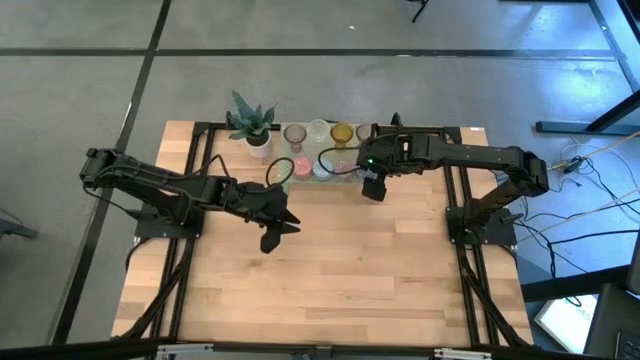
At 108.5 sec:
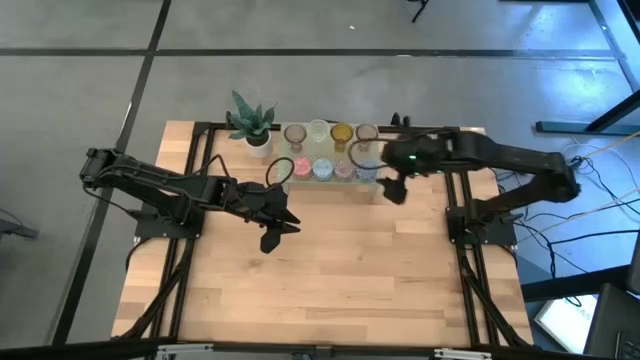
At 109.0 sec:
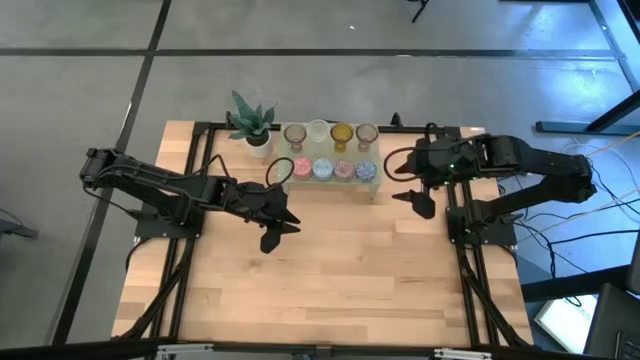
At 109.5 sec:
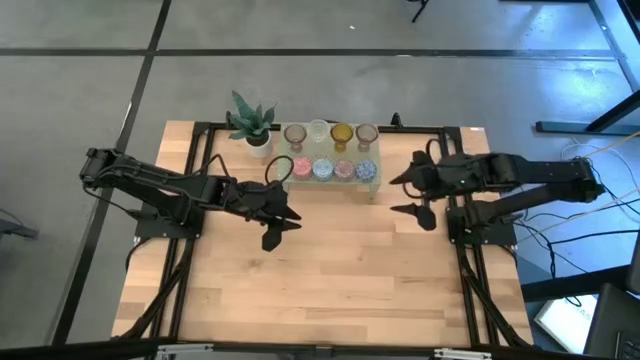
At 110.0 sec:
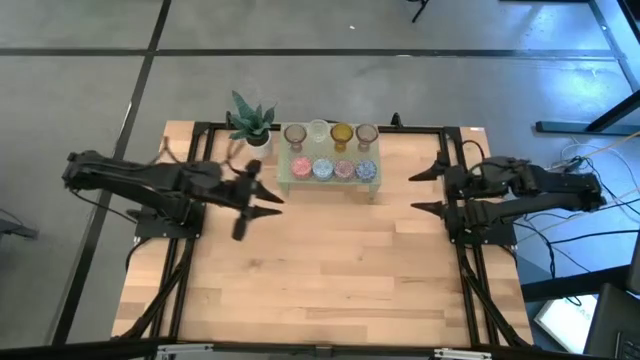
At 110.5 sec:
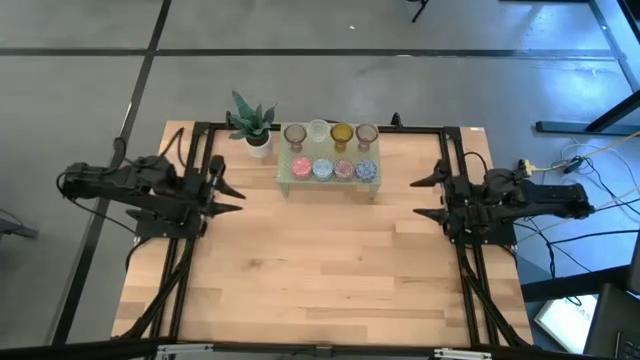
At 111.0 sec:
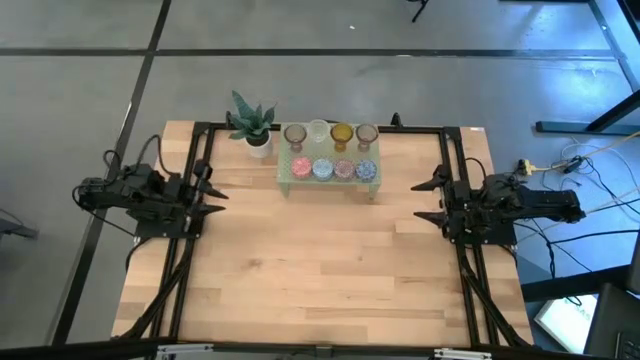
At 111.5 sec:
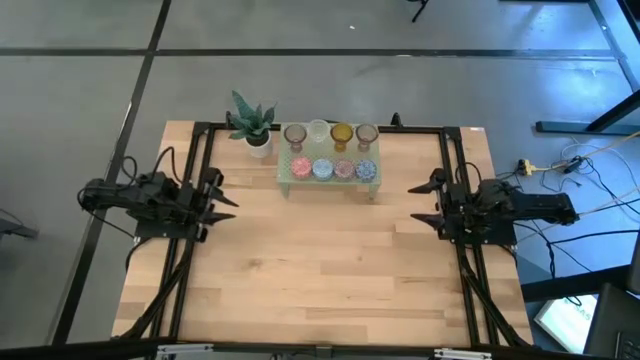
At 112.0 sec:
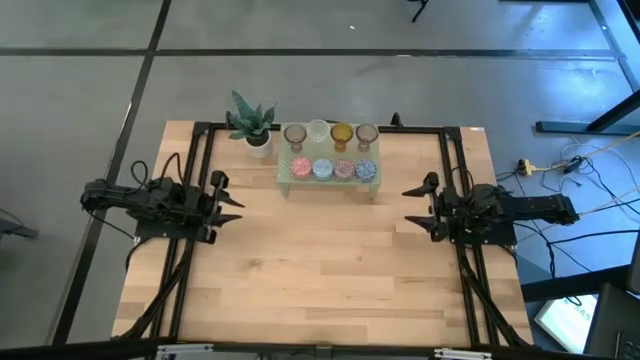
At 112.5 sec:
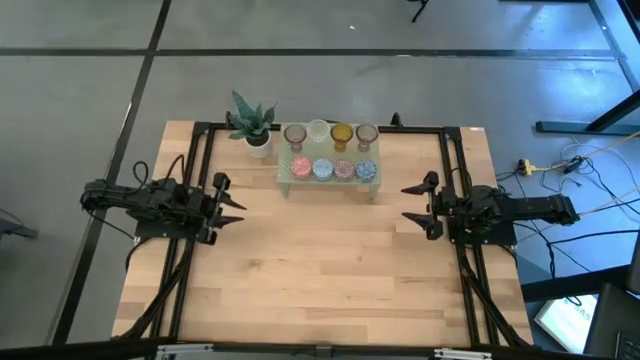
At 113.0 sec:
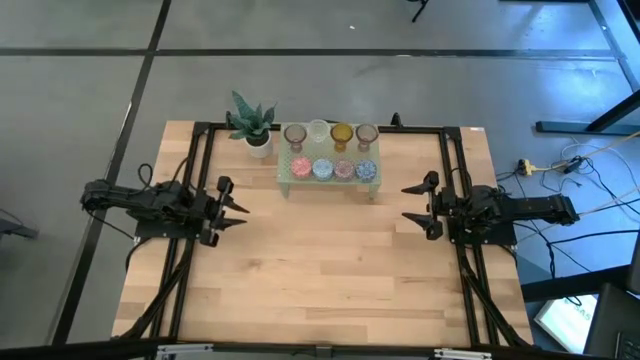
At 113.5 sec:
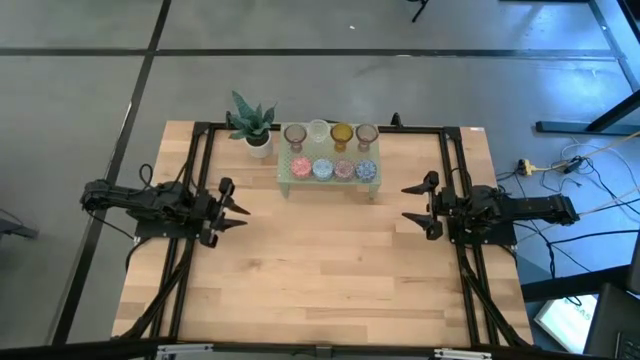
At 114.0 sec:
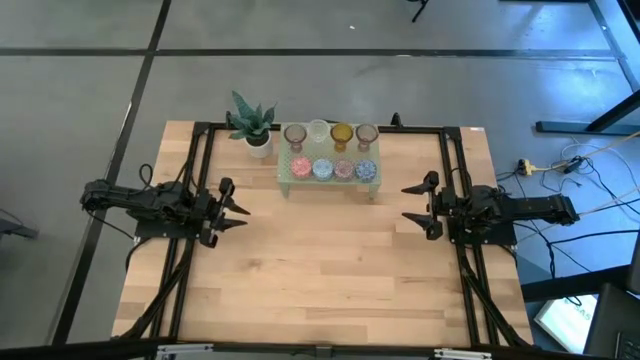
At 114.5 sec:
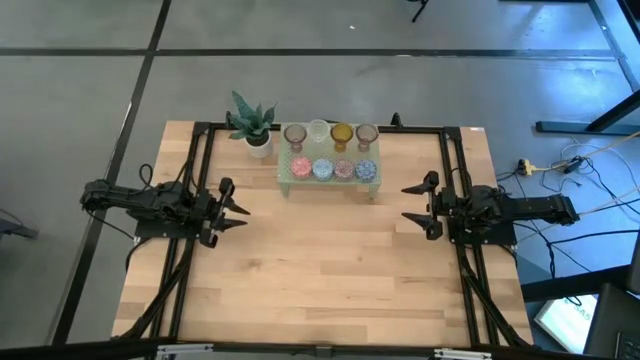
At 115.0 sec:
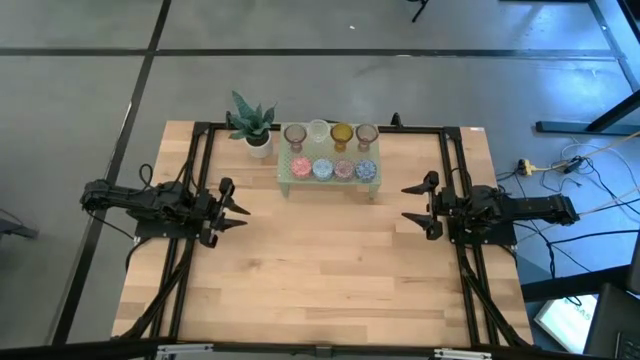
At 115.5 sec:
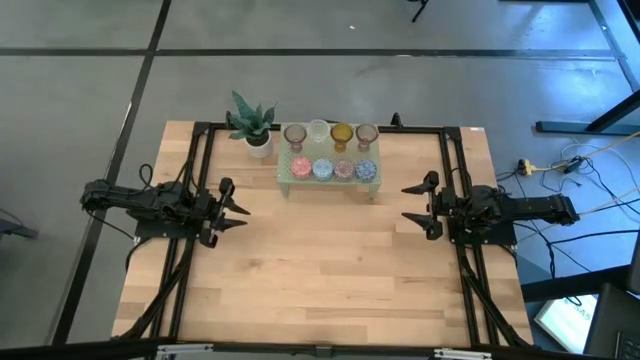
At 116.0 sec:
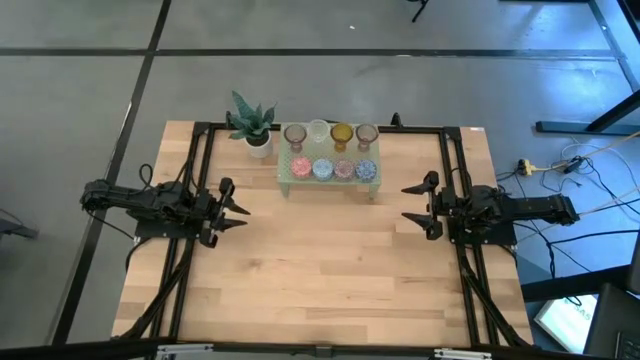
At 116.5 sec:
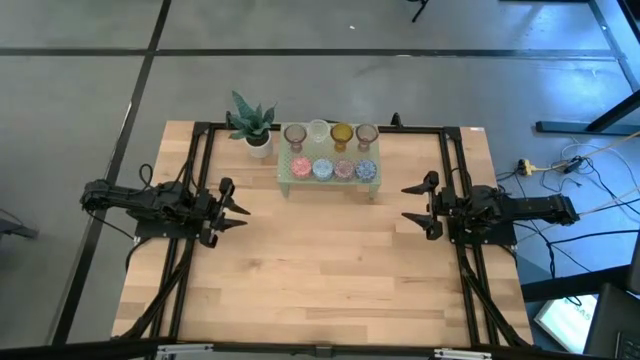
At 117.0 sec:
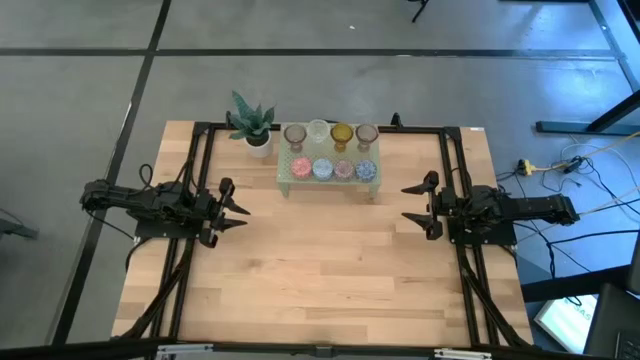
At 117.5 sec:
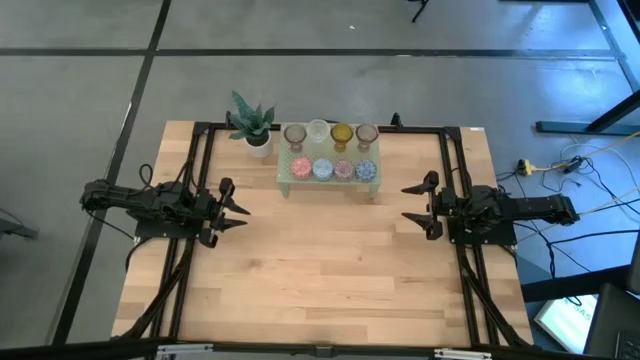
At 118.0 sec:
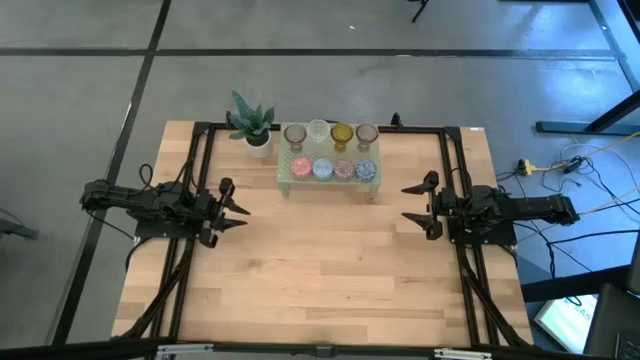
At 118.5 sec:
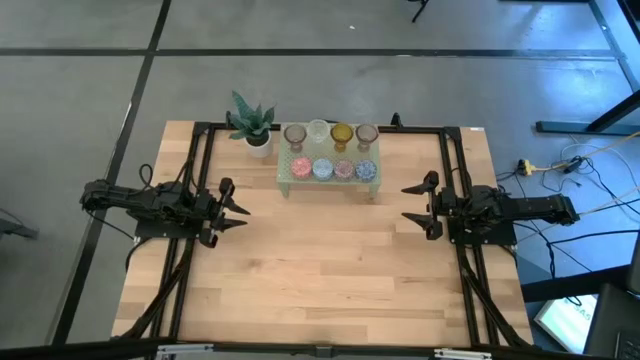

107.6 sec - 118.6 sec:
Task: Pick & Place candle stick holders
Return to Home Position

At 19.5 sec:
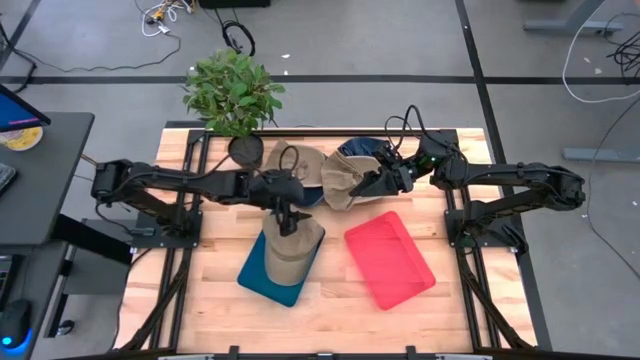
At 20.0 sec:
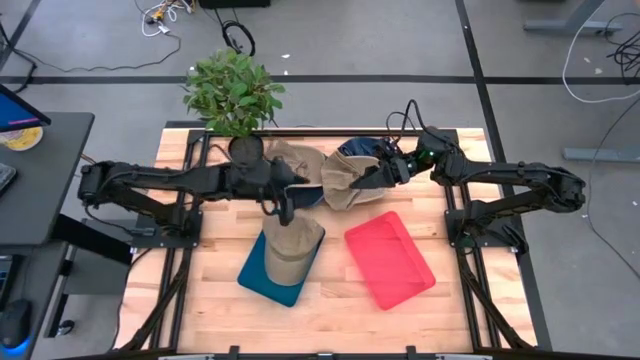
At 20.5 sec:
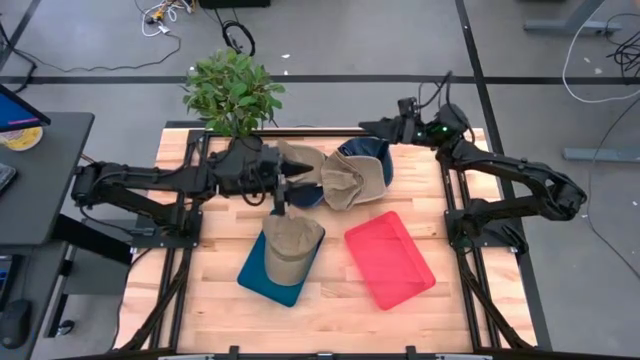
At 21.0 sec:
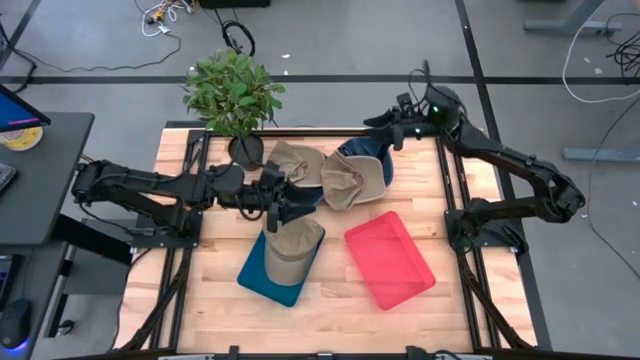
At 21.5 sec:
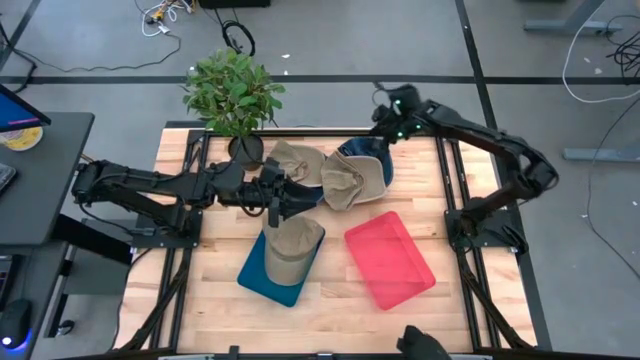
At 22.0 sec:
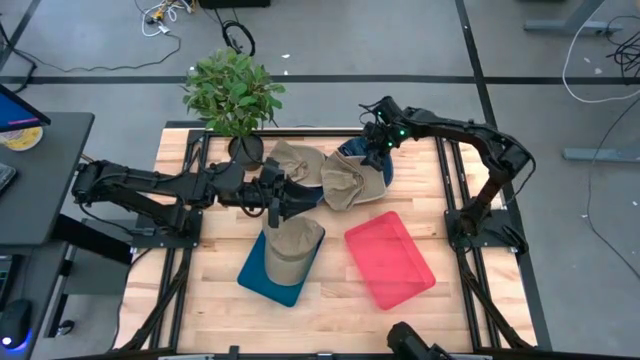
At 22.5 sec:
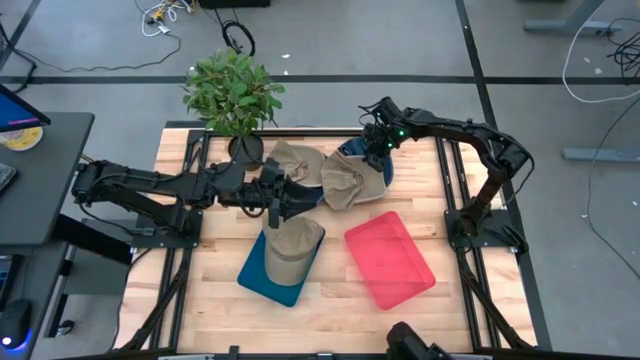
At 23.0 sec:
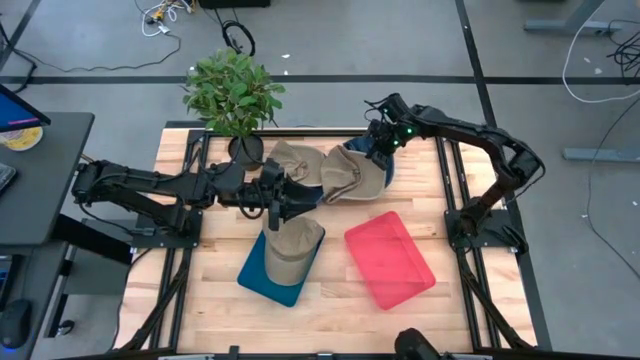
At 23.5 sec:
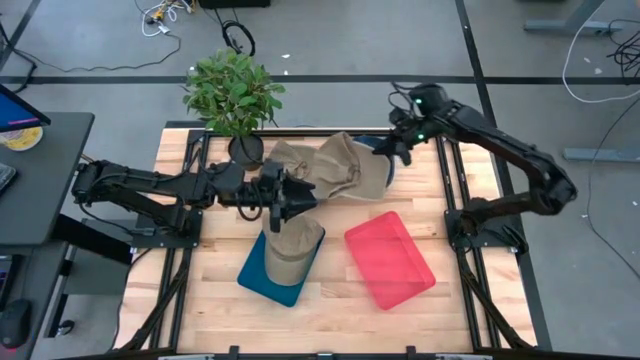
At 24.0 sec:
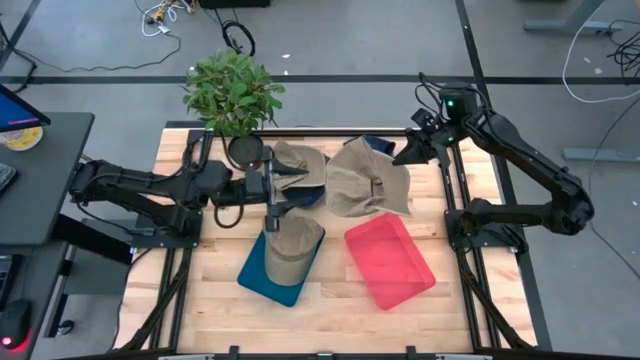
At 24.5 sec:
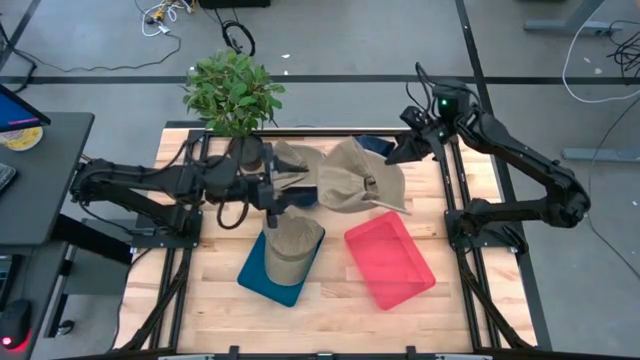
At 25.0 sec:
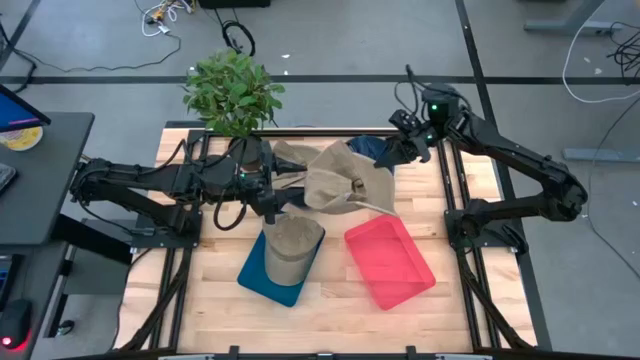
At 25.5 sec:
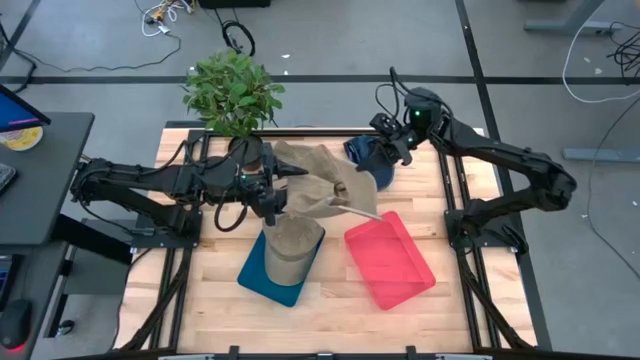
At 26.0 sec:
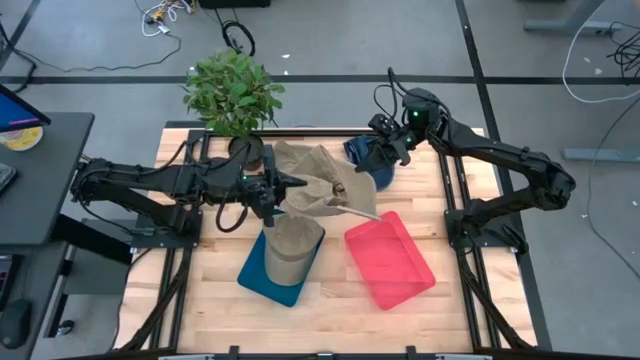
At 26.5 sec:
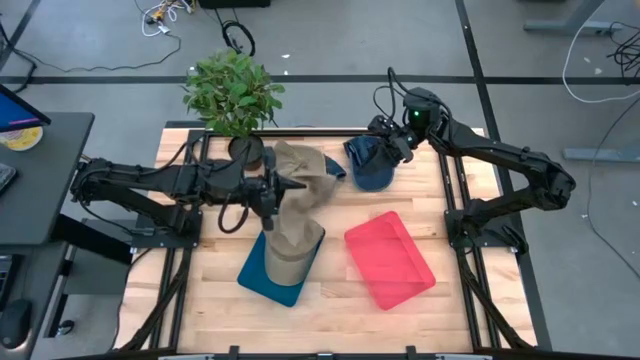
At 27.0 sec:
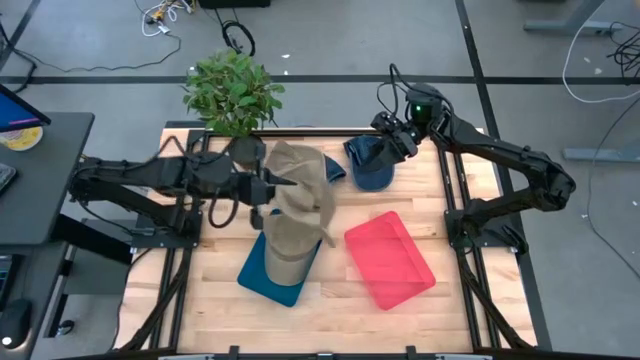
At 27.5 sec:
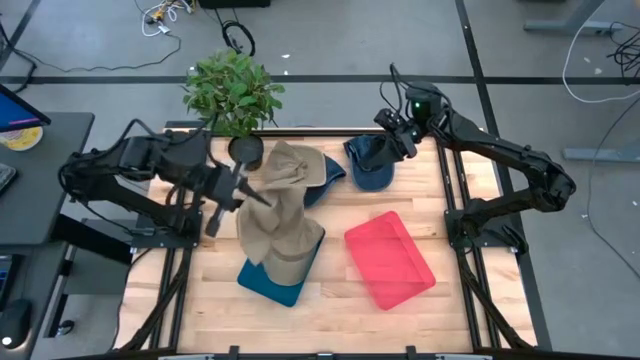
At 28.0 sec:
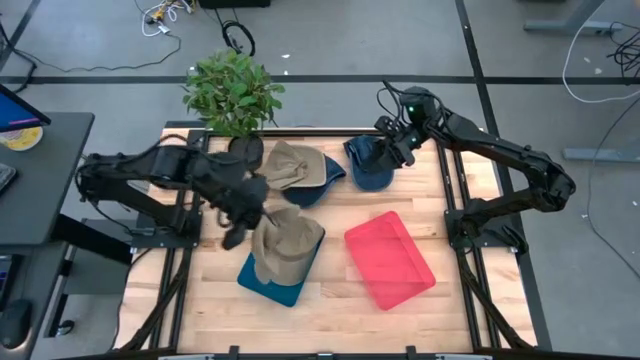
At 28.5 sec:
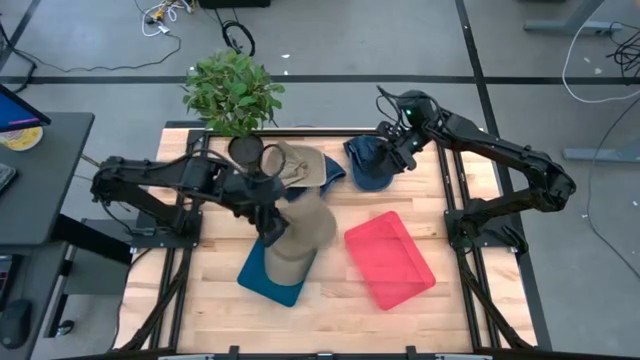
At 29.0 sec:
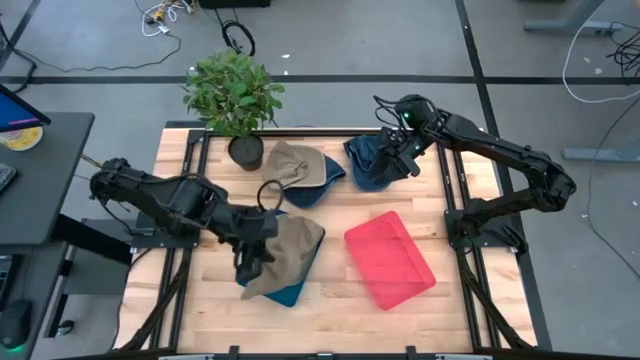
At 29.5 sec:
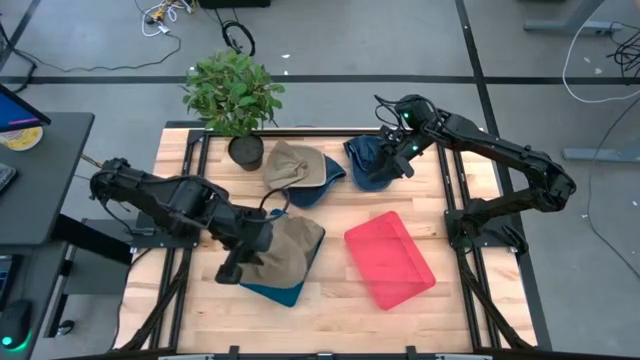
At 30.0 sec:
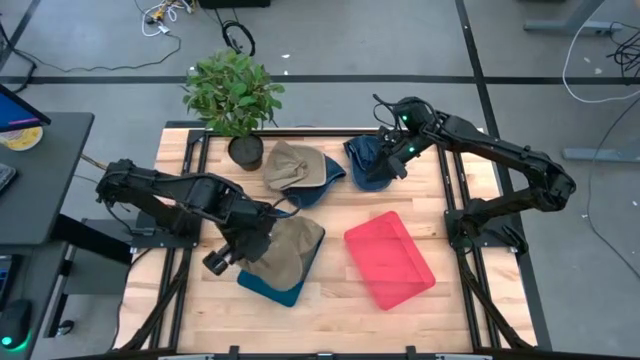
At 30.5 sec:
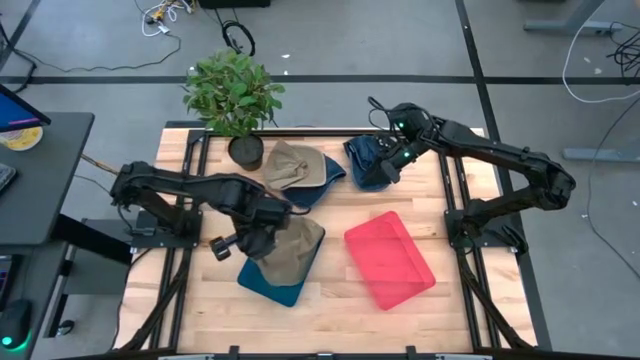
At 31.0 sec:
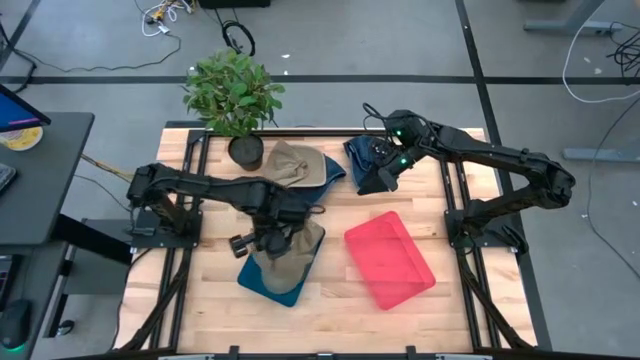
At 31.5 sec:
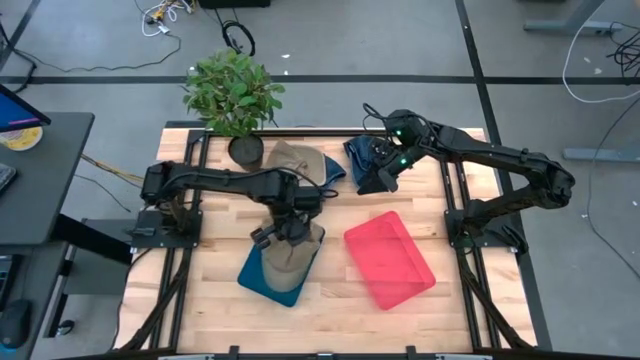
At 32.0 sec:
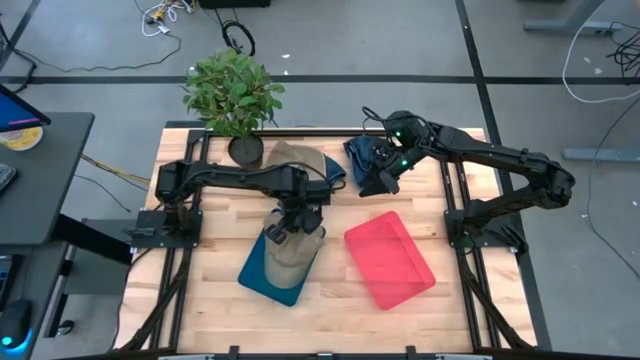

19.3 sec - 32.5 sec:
Task: Pick & Place hat
Put the brown cap into the blue bin
